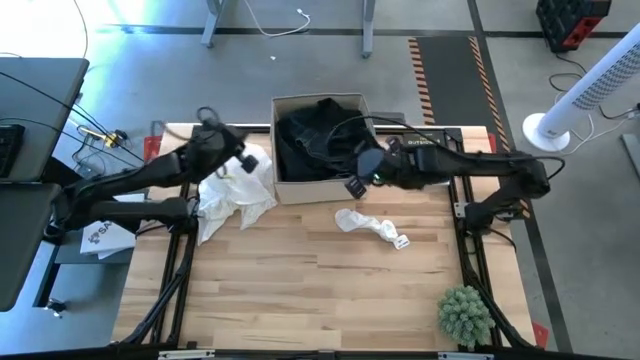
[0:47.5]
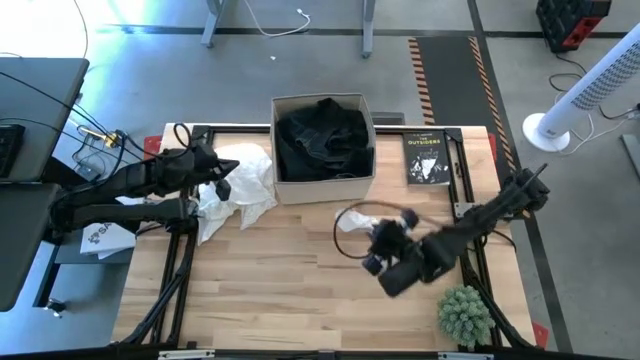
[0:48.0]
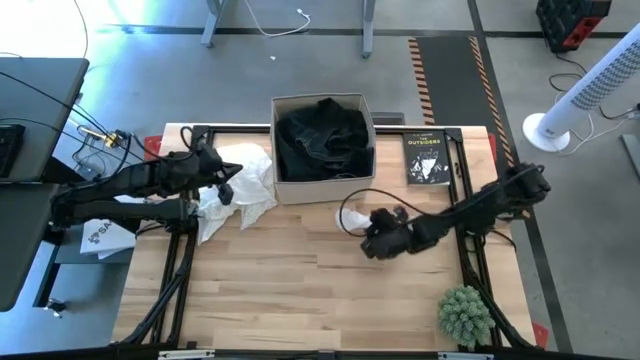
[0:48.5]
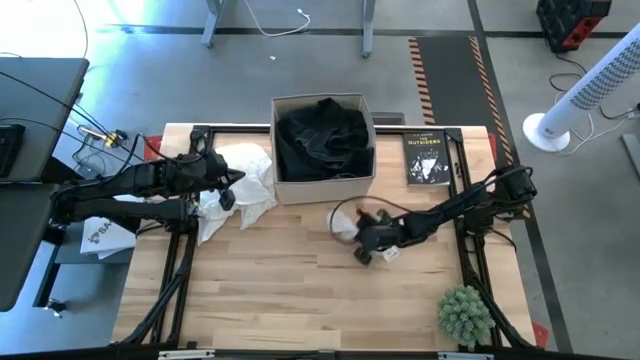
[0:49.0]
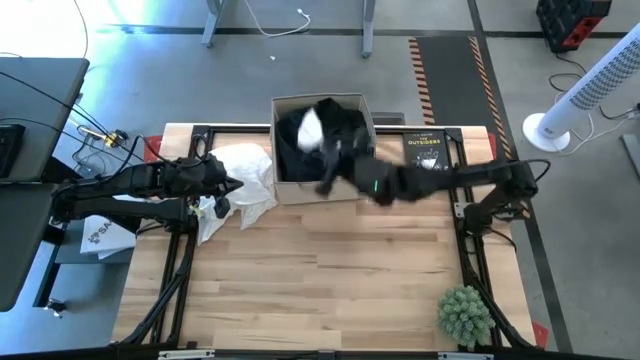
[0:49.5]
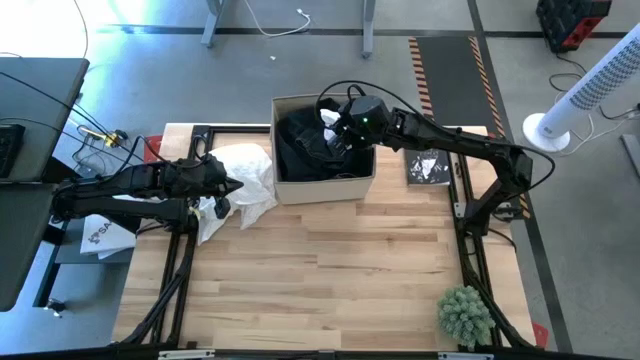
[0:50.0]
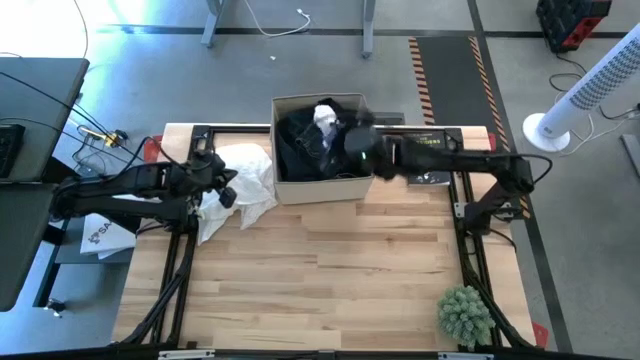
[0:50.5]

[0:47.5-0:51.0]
Task: Sort clothes
Put the white sock into the laundry bin

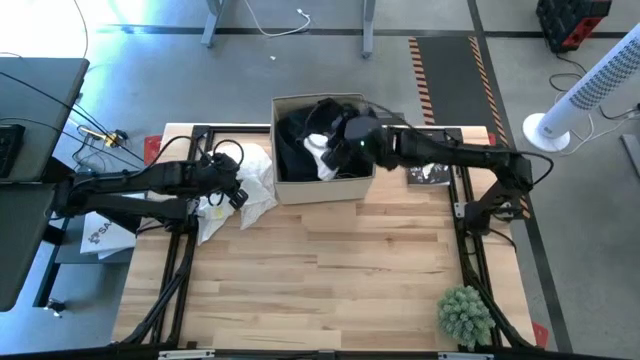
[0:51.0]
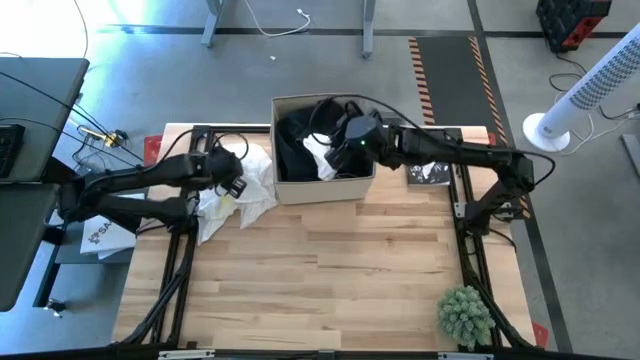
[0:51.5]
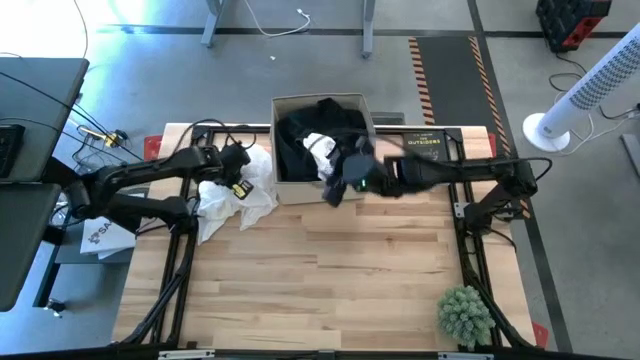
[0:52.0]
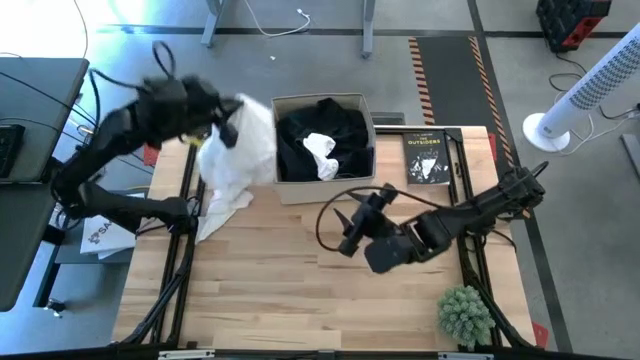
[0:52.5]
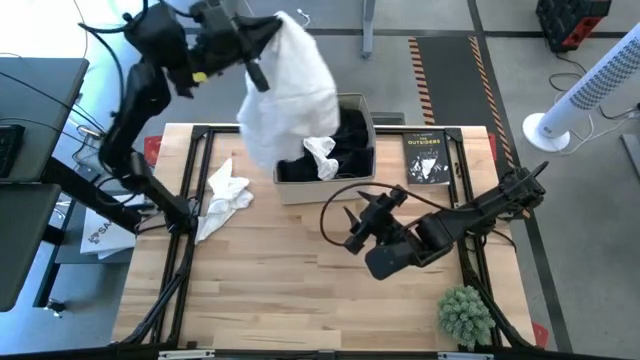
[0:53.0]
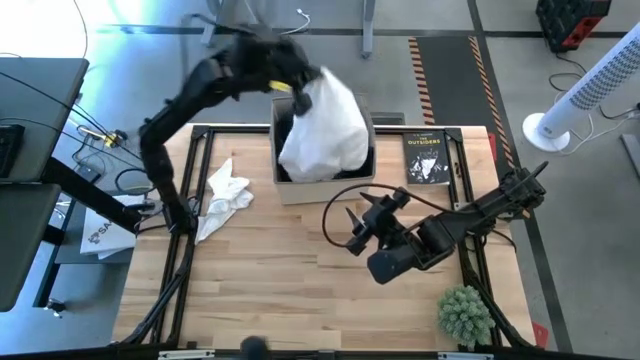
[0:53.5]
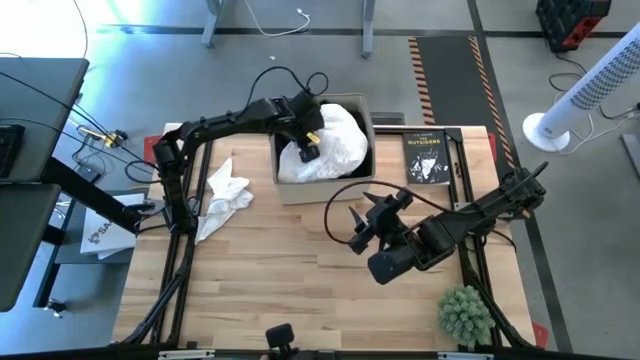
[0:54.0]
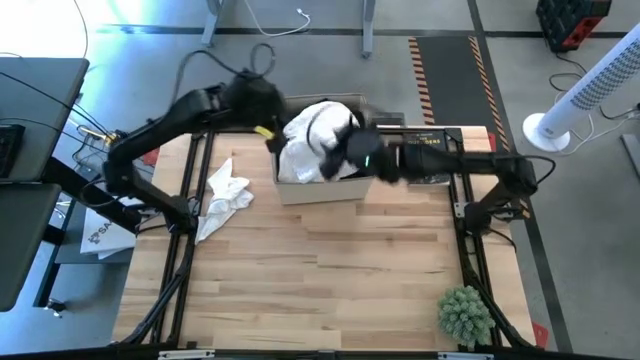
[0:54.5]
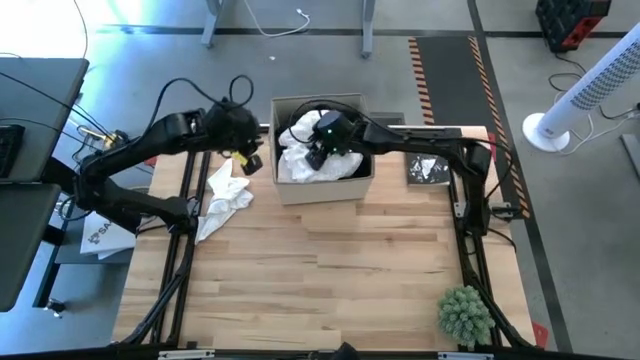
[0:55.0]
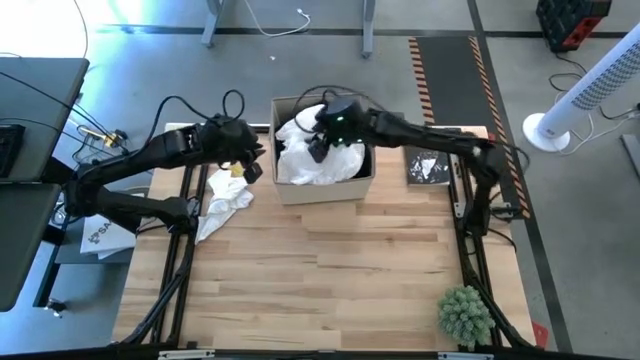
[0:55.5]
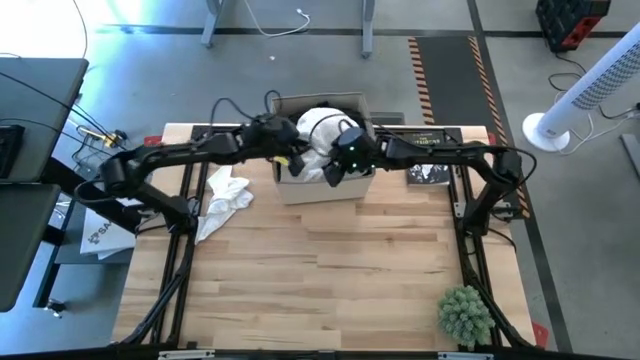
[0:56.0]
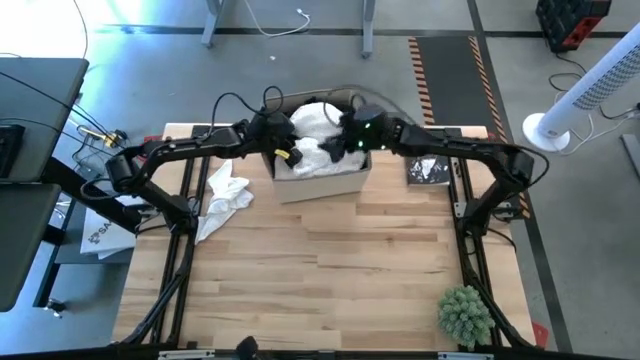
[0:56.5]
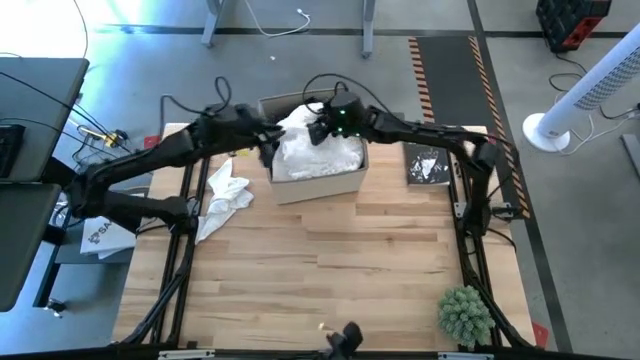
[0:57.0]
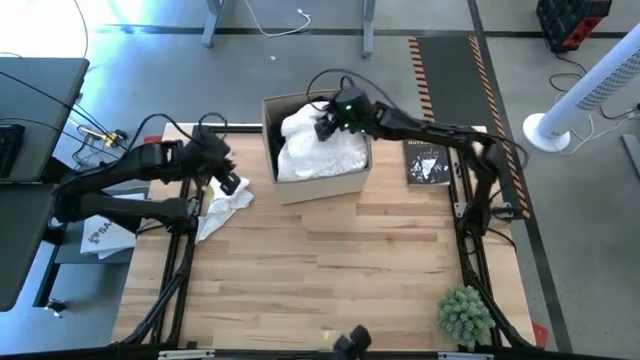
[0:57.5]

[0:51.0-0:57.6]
Put the white dress into the laundry bin

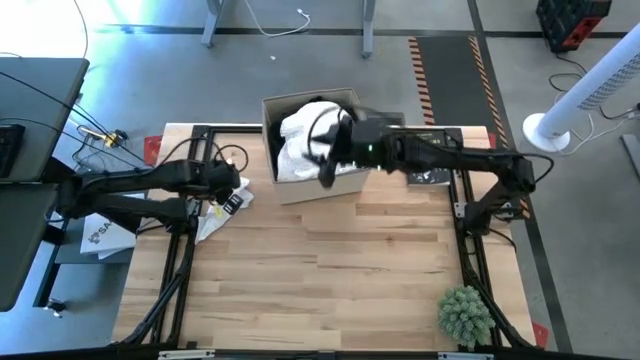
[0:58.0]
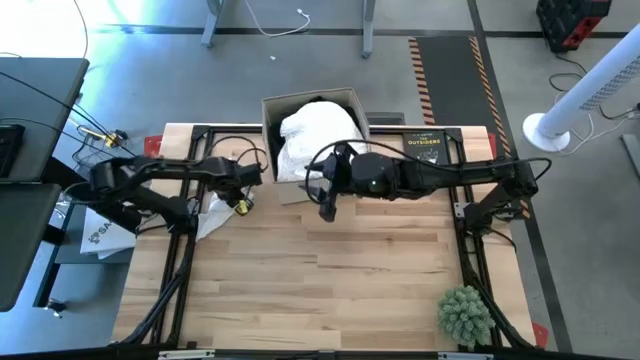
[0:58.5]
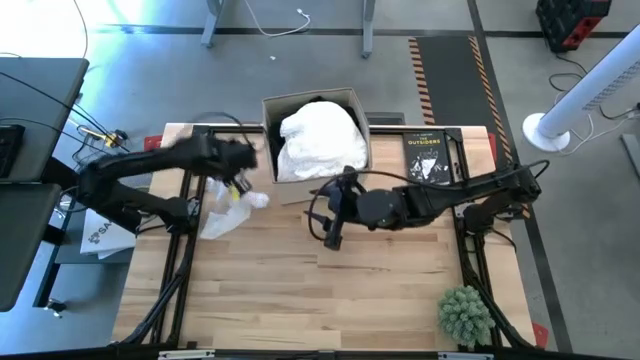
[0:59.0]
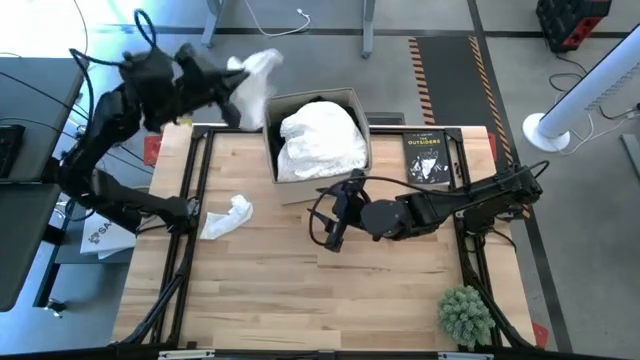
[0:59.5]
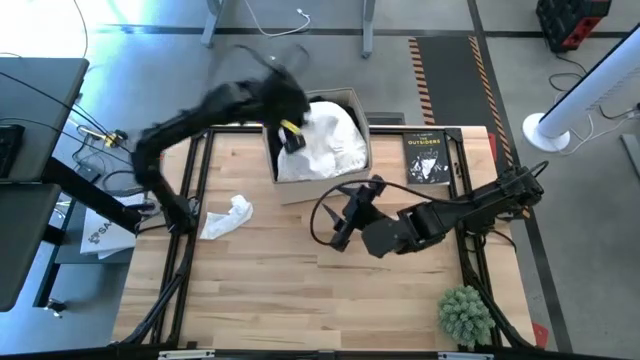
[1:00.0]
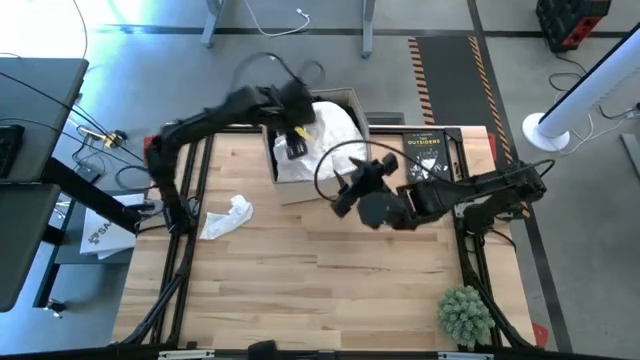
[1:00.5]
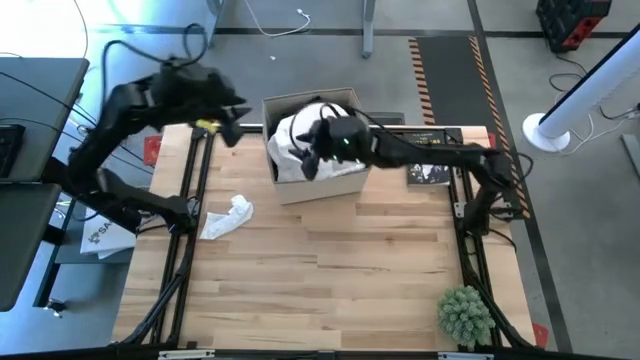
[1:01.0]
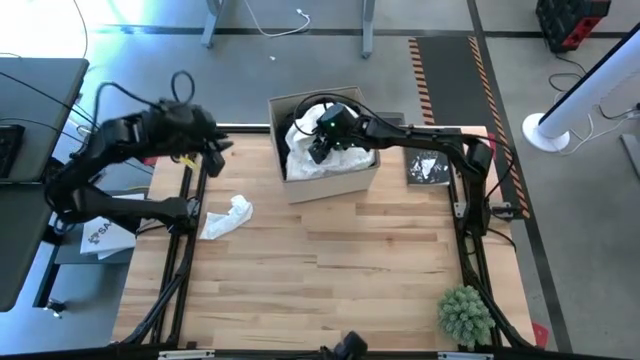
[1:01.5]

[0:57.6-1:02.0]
Put the white shorts into the laundry bin

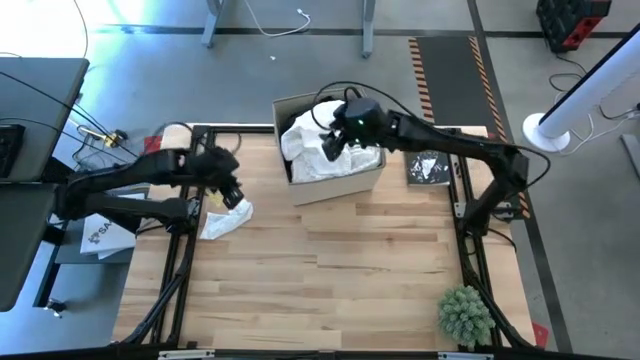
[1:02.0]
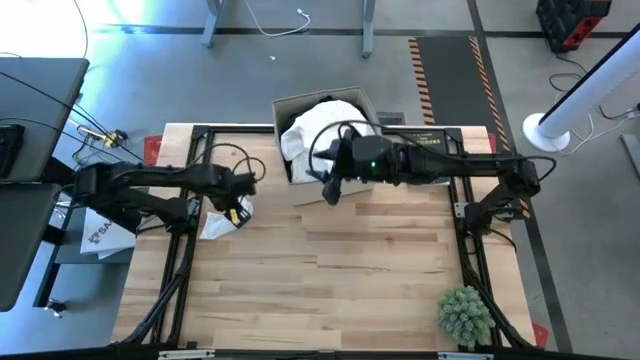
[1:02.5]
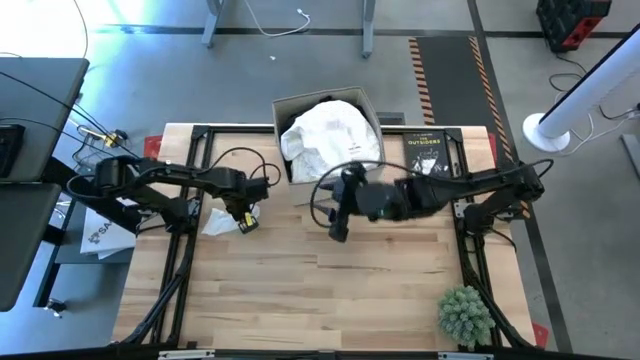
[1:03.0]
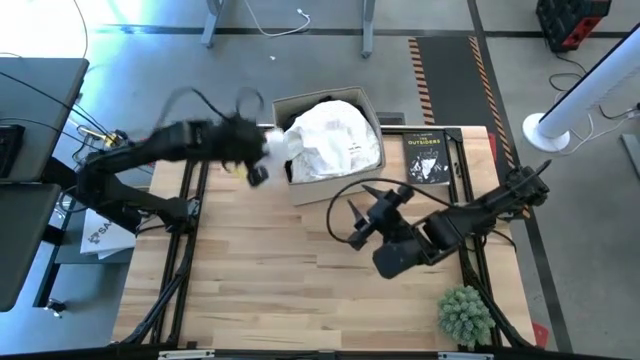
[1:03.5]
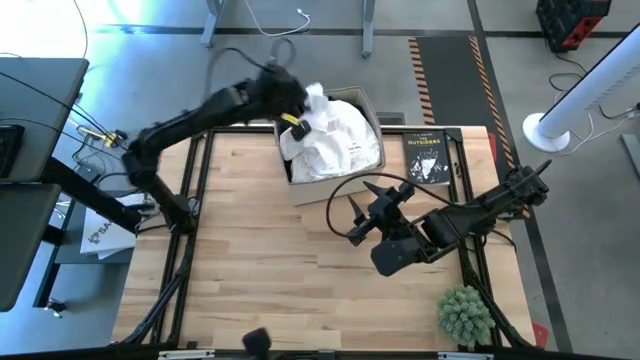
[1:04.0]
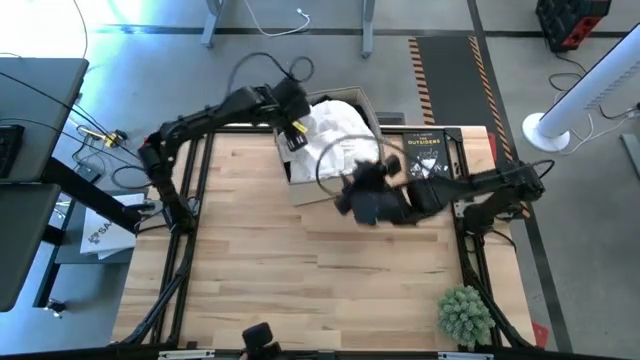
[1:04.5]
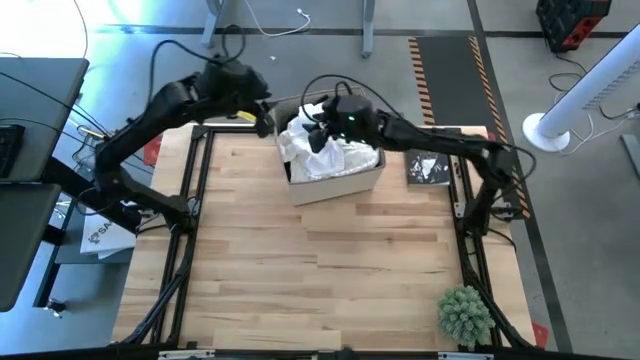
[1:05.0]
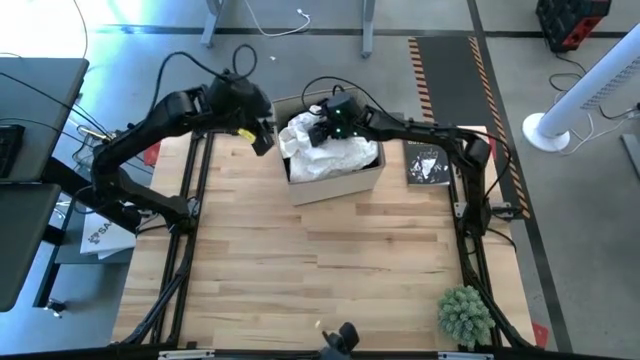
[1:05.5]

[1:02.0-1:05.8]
Put the white sock into the laundry bin

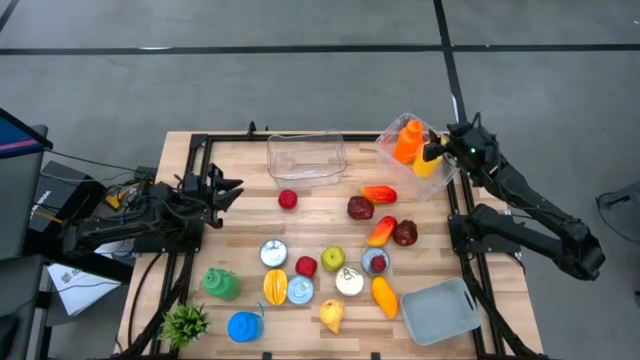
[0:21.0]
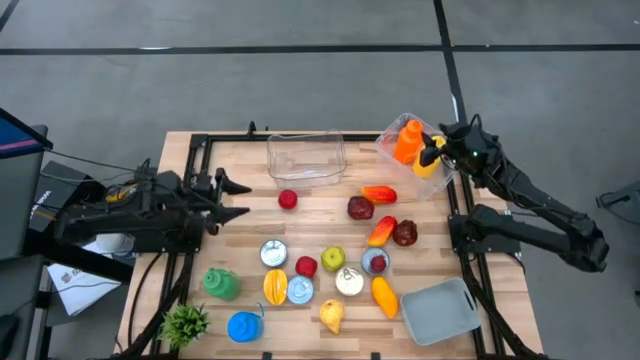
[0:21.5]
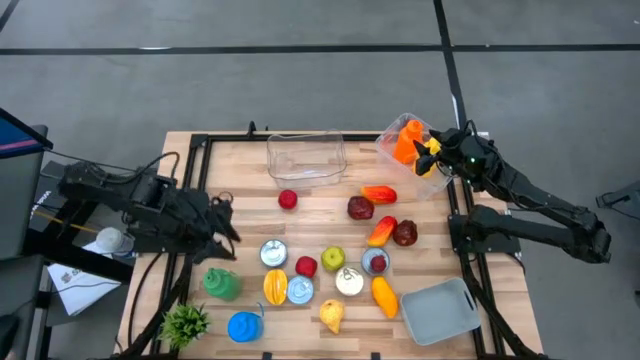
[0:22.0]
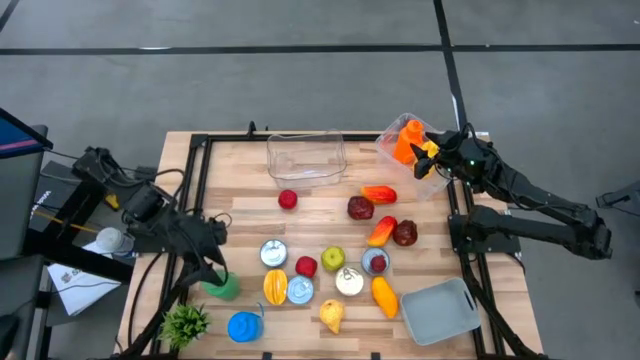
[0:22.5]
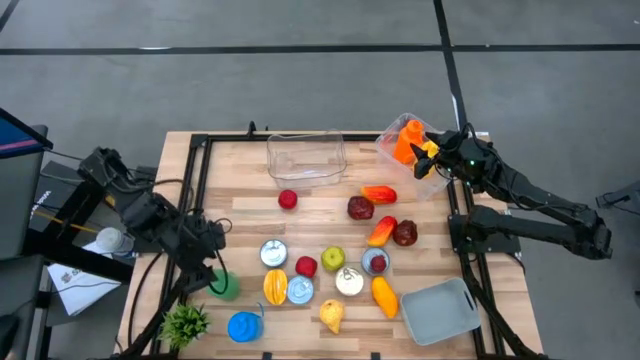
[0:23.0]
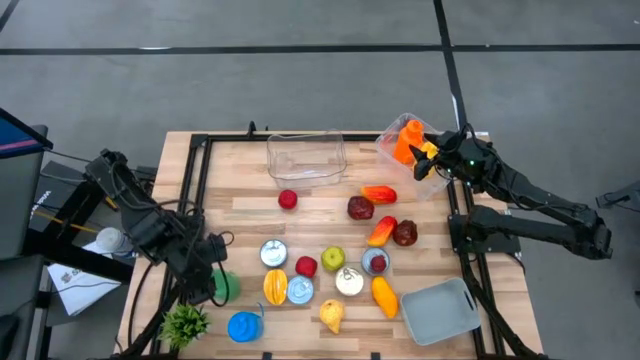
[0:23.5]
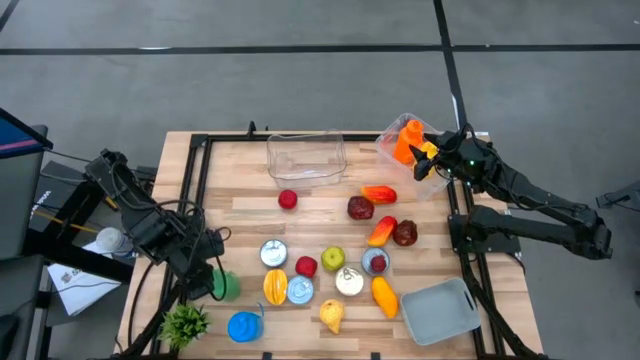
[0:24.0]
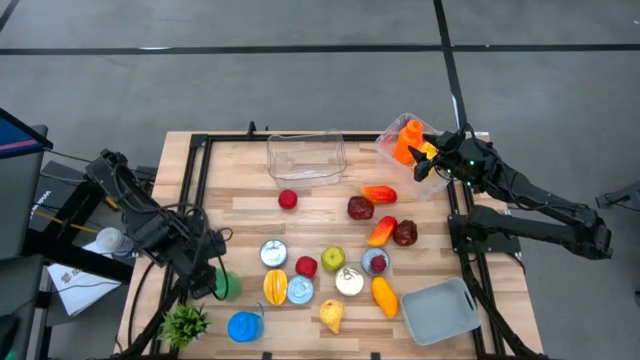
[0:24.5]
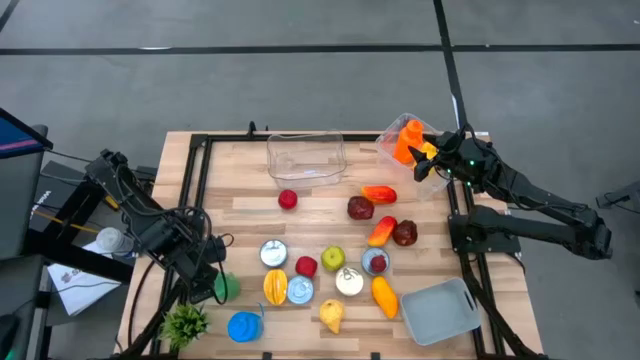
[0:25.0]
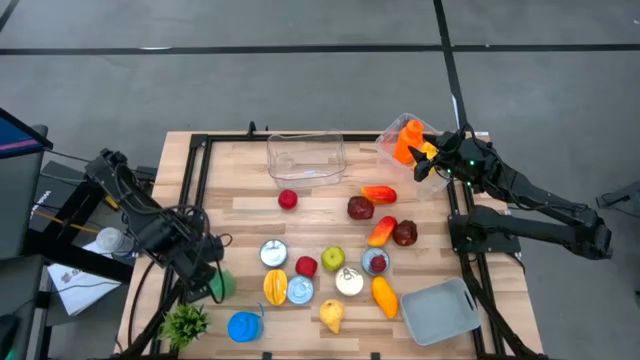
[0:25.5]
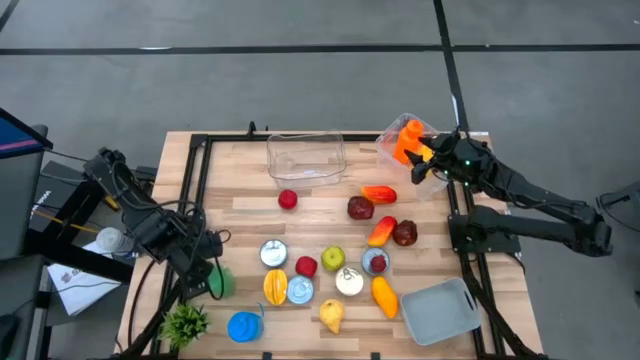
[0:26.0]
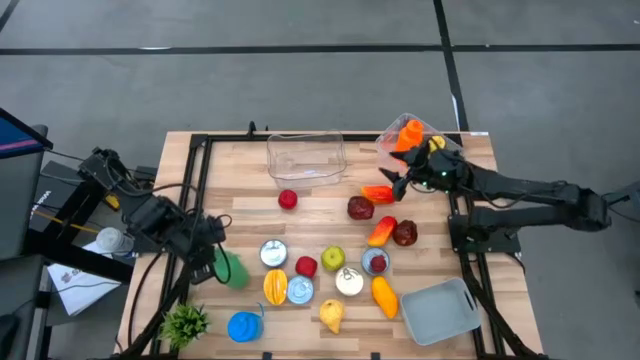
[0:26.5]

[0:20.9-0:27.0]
Task: Pick & Place Food Item
Put the green water bottle into the transparent container
